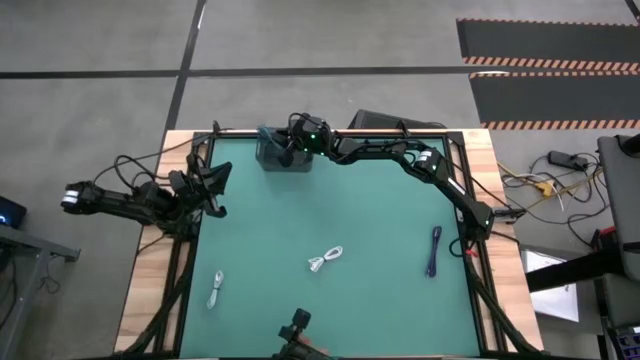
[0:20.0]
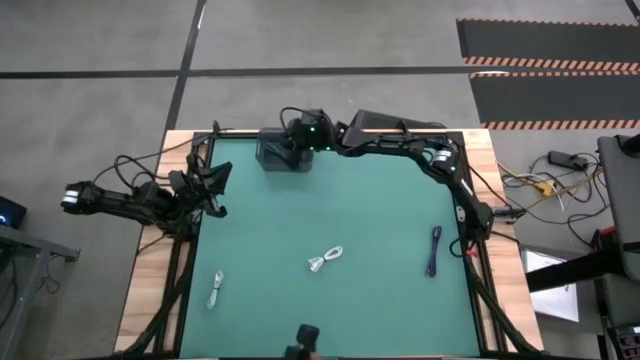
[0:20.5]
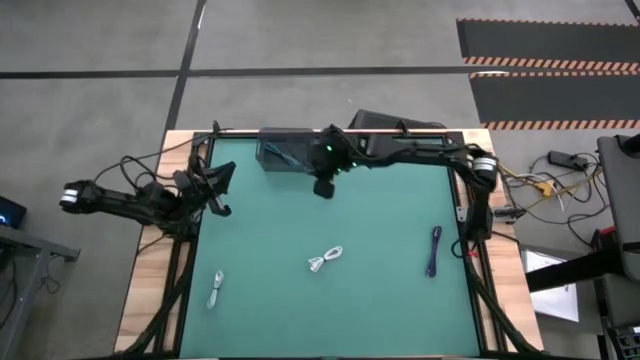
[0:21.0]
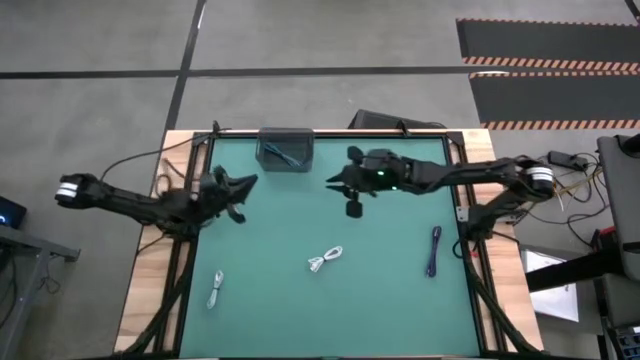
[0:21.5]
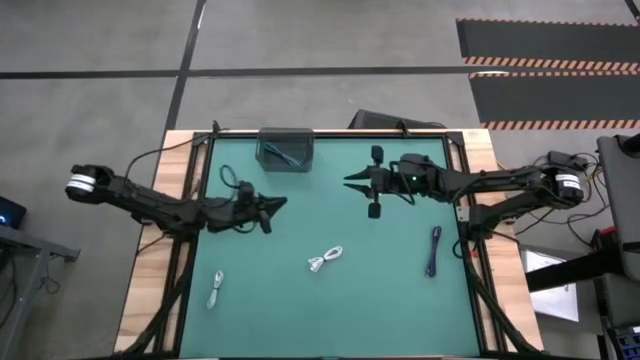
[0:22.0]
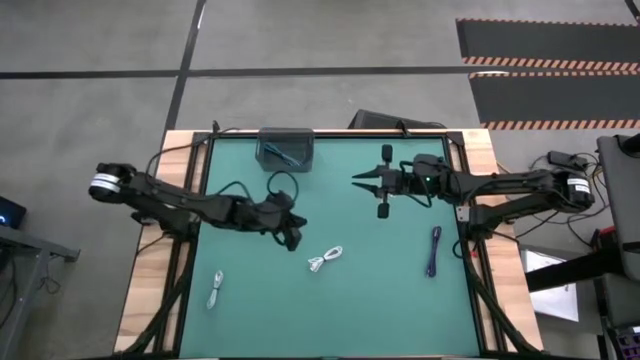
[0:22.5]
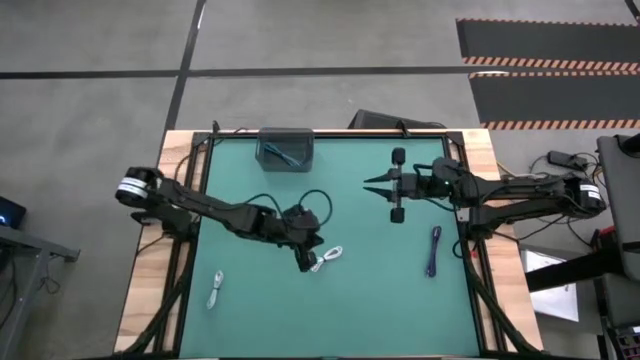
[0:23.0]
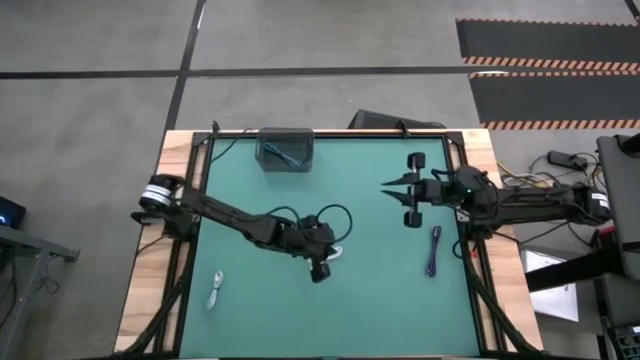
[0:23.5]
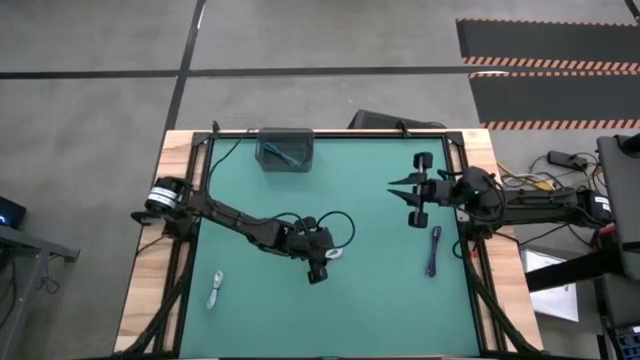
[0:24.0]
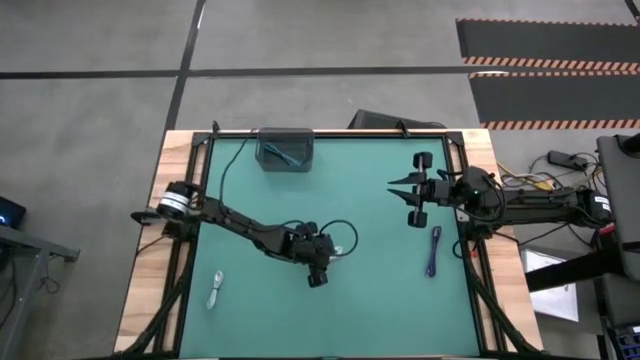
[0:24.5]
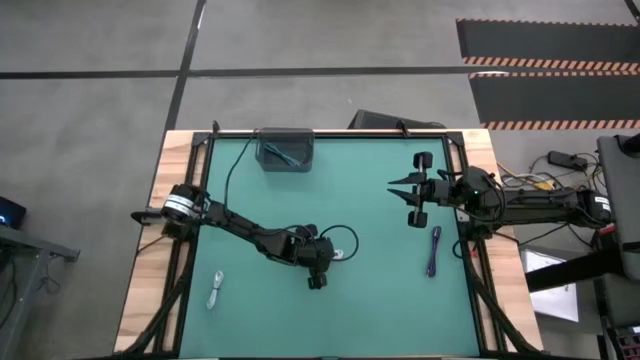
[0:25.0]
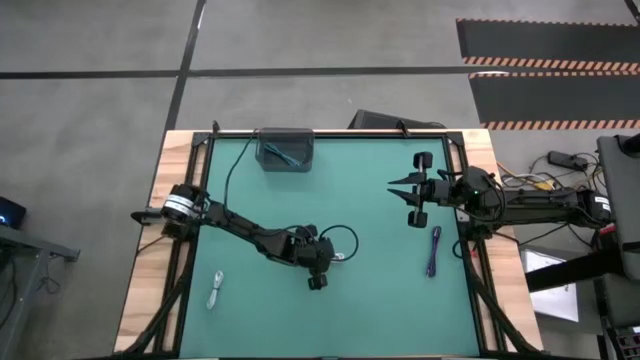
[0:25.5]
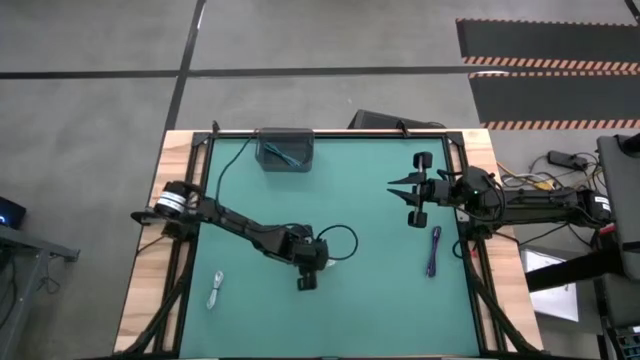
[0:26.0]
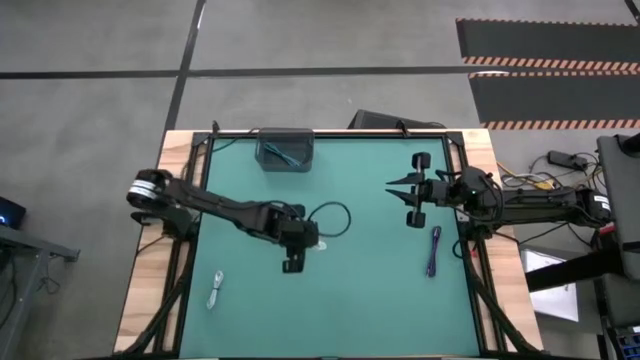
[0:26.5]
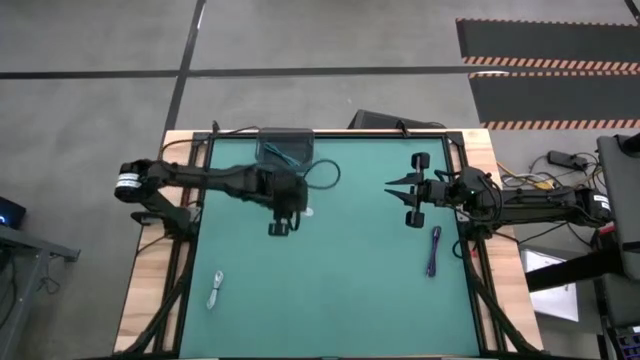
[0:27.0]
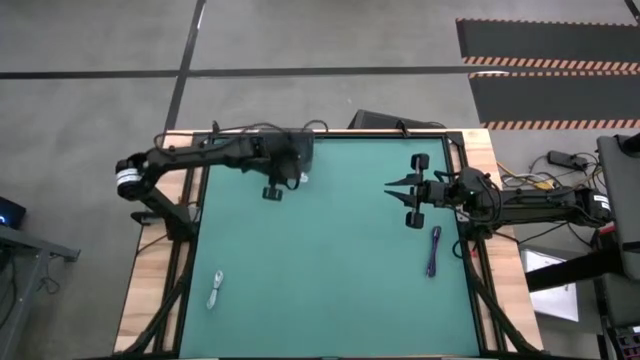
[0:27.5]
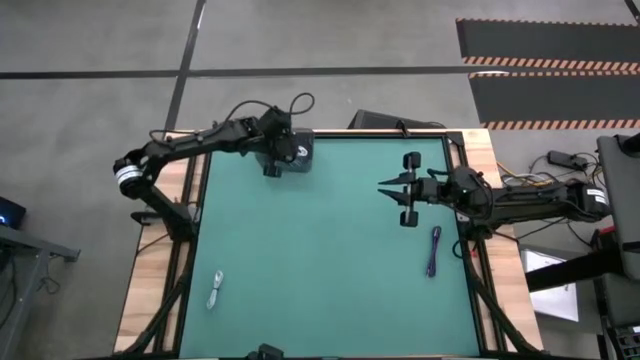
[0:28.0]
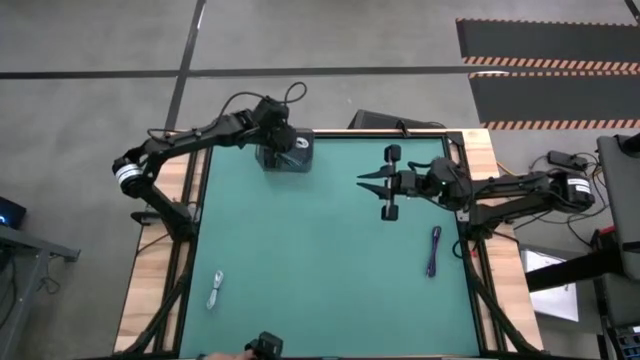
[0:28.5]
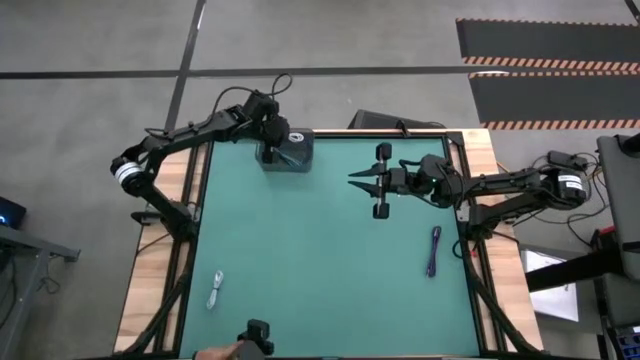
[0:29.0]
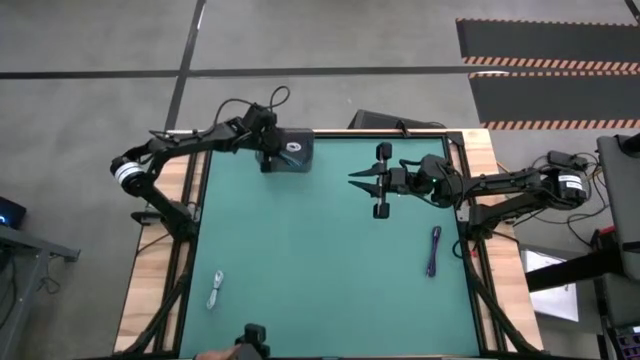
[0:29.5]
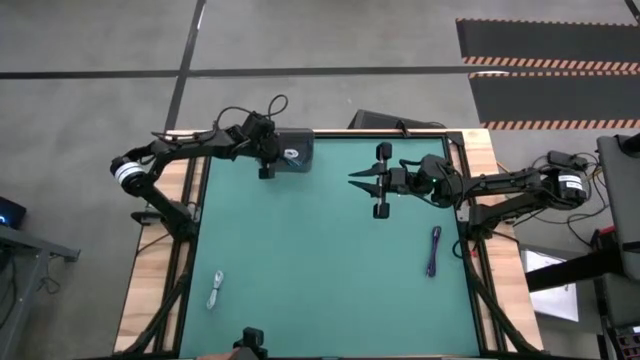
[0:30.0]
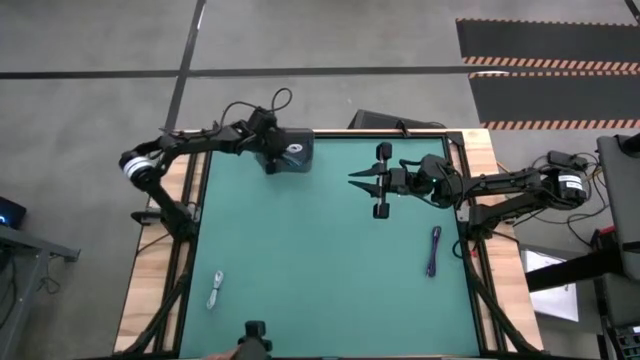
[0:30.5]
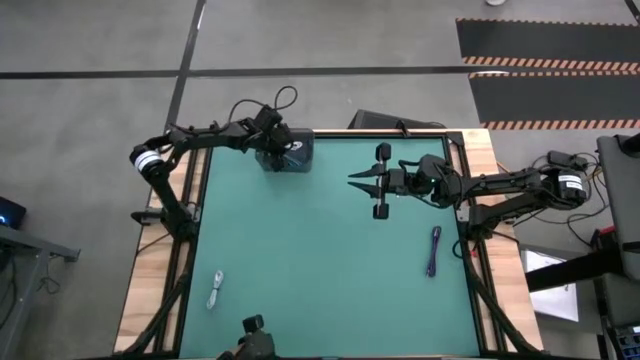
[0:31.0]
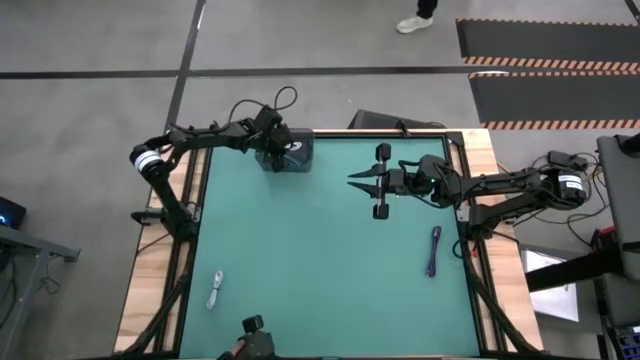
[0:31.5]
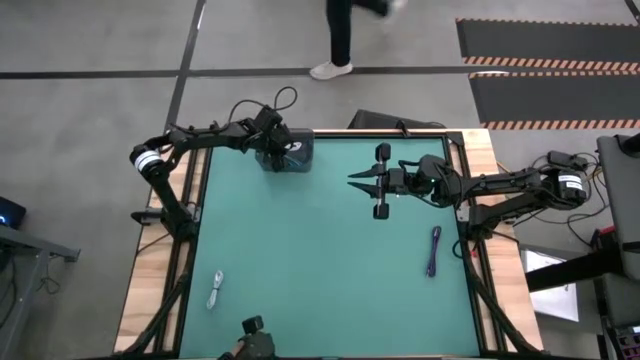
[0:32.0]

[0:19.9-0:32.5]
Task: Pick and place USB-C Cables
Put the white charger cable into the bin

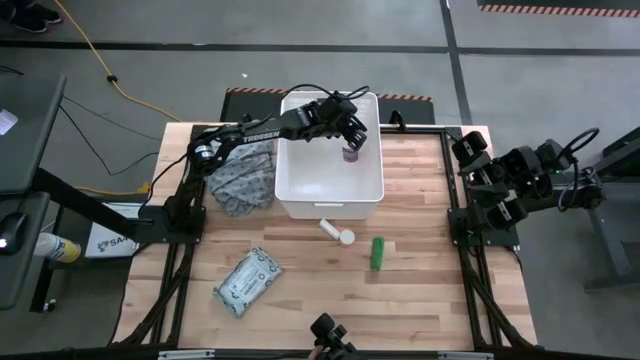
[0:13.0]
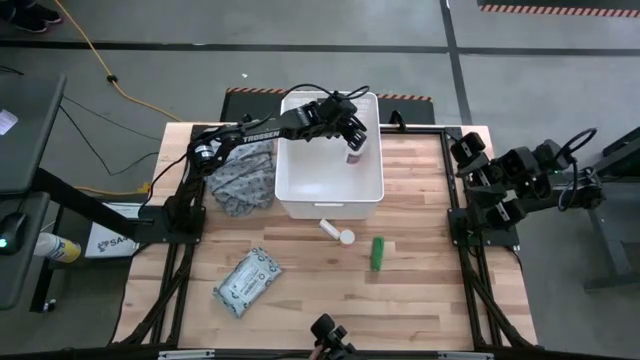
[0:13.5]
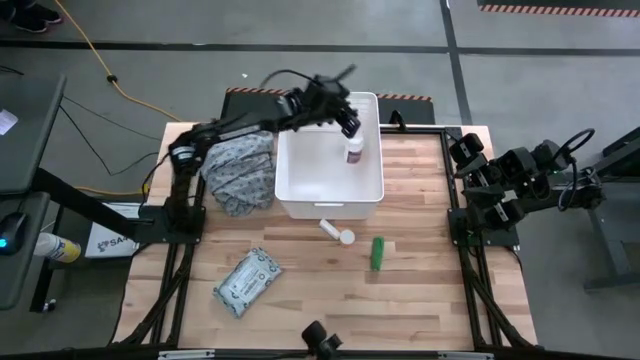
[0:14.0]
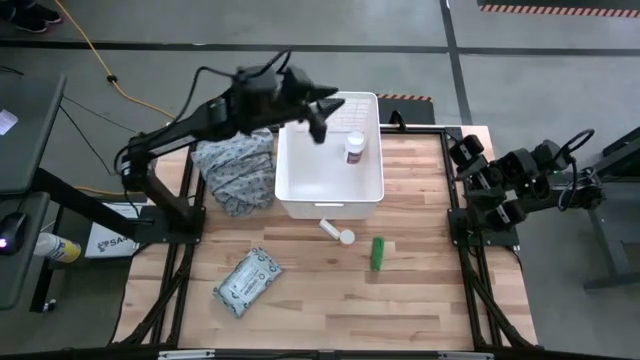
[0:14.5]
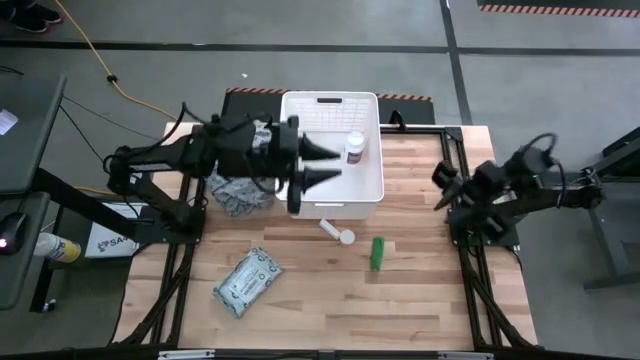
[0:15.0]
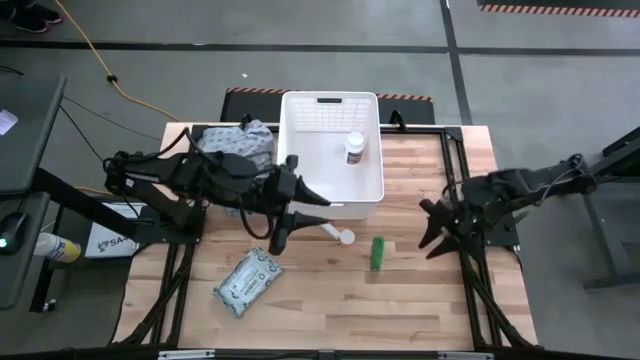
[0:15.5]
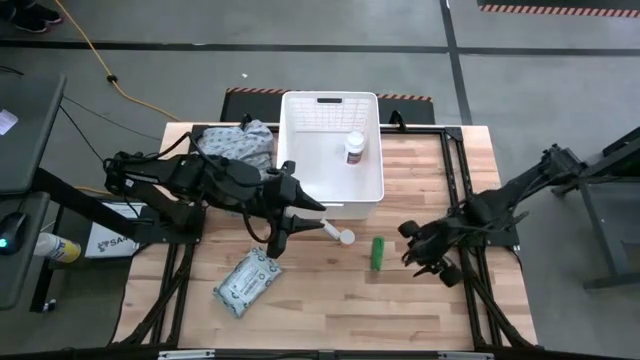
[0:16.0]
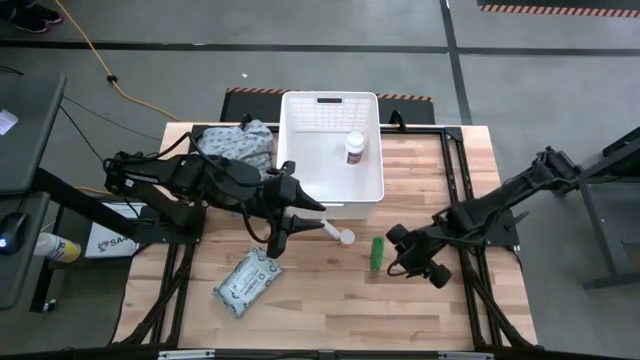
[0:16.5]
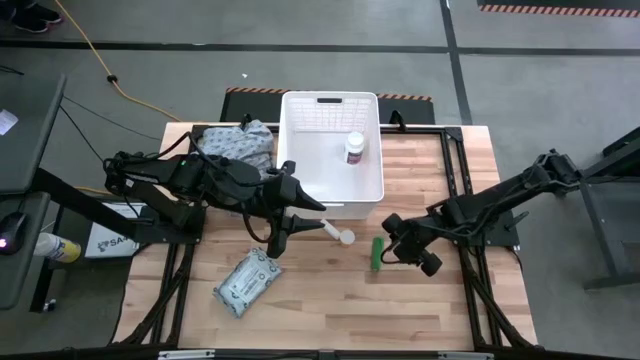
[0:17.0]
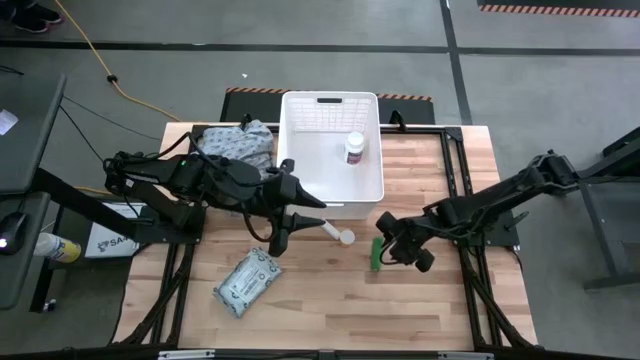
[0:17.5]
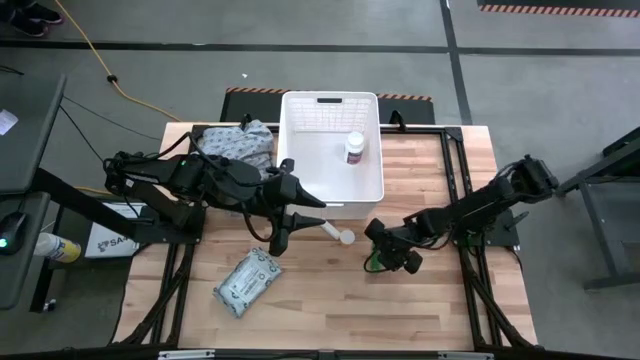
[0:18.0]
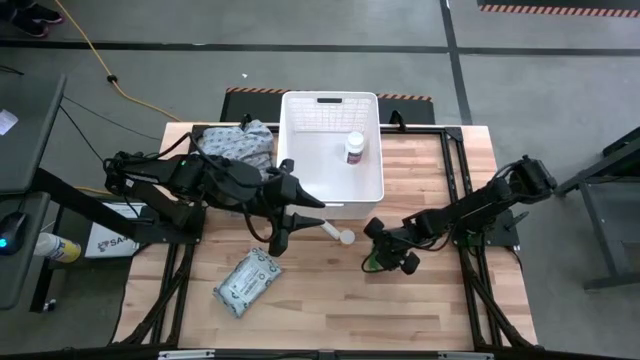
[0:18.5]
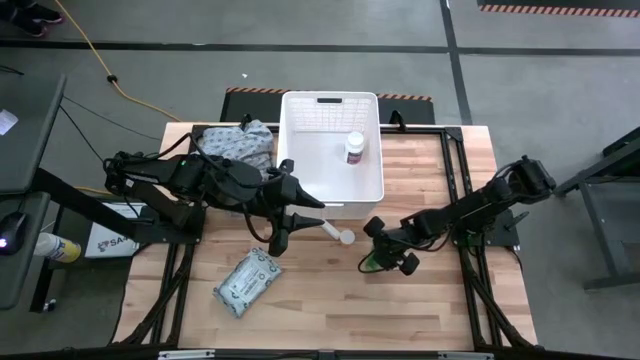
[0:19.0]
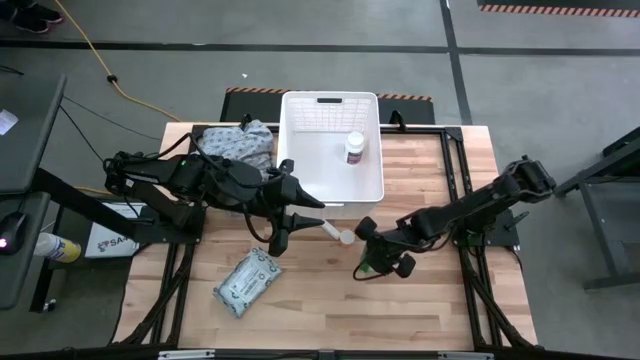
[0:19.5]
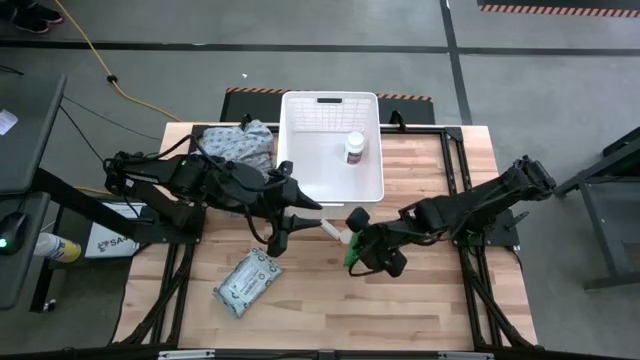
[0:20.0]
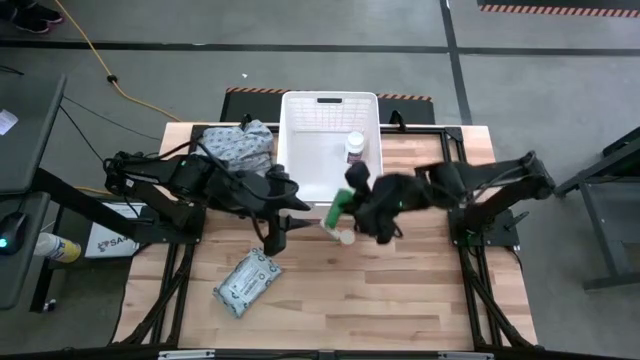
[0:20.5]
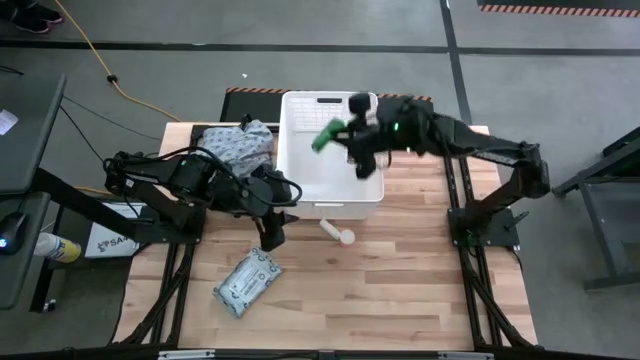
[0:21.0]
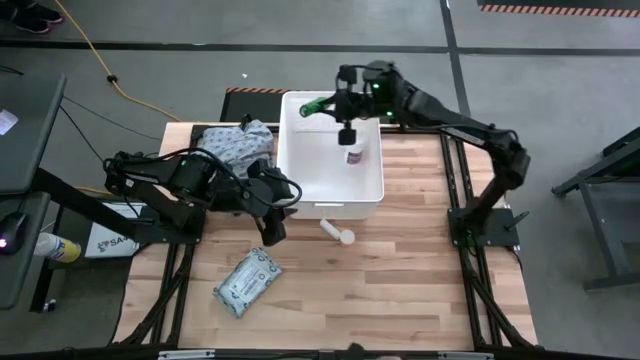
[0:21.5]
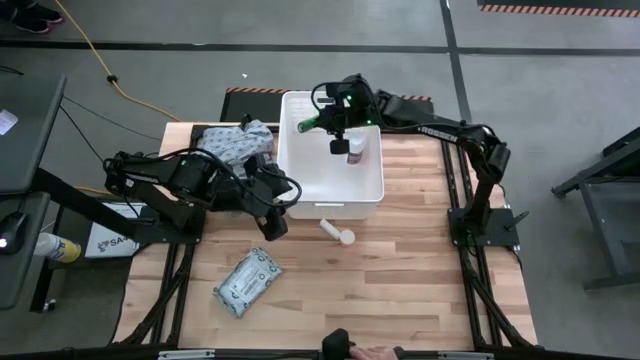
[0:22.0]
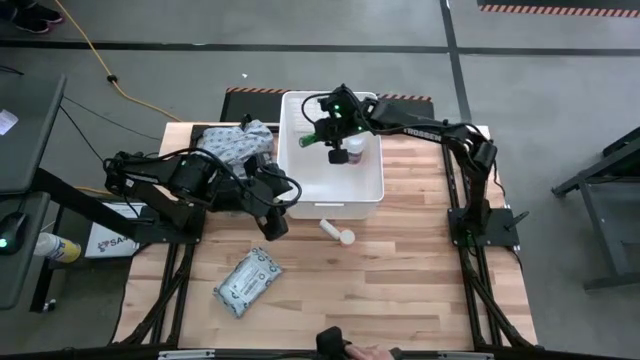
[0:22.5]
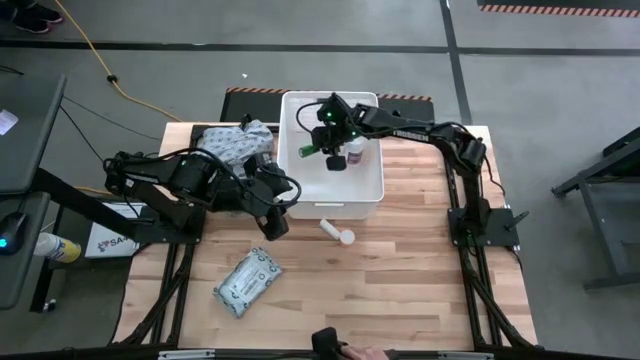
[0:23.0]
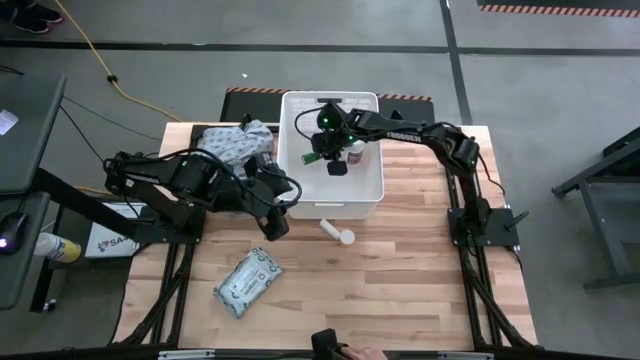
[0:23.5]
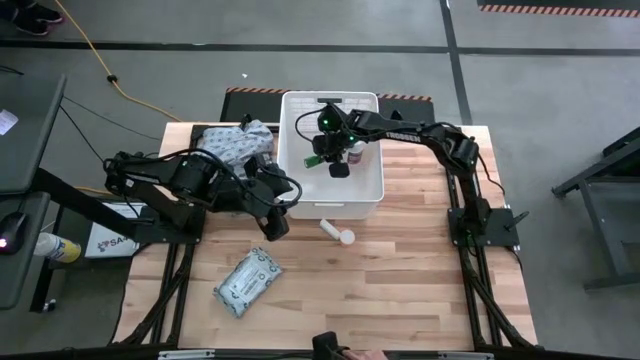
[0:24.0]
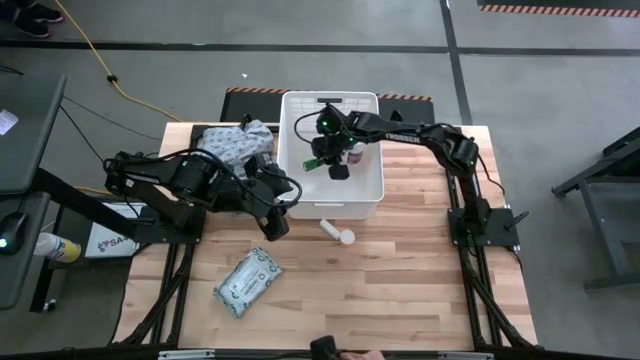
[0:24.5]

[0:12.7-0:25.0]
Task: Pick & place medical supplies in basket/bin
Put the green bandage into the white bin
